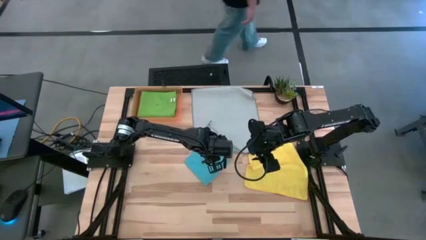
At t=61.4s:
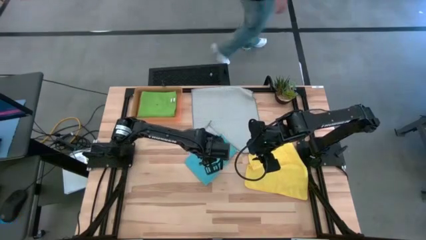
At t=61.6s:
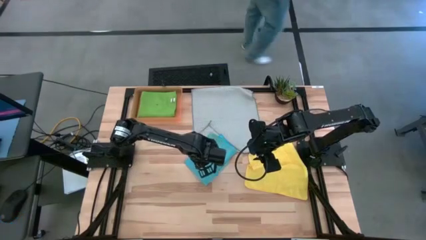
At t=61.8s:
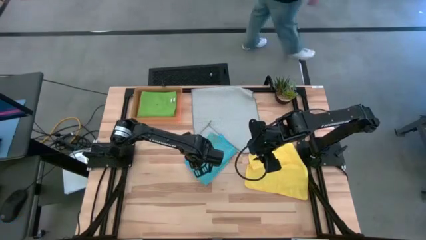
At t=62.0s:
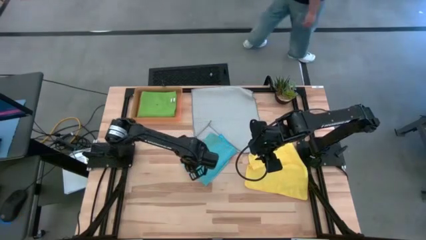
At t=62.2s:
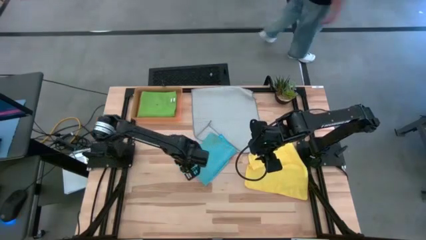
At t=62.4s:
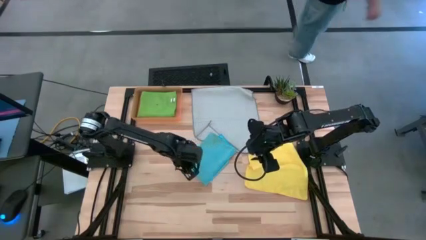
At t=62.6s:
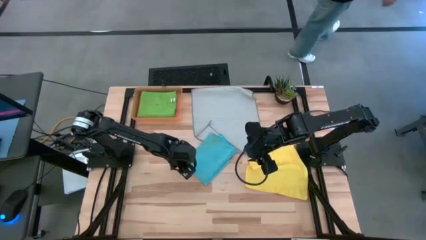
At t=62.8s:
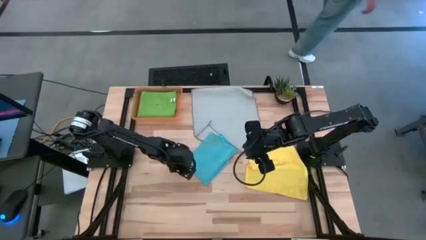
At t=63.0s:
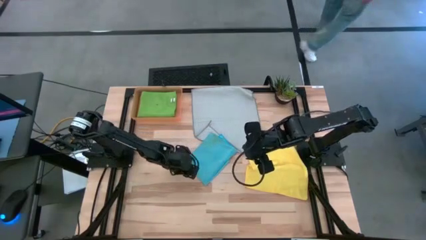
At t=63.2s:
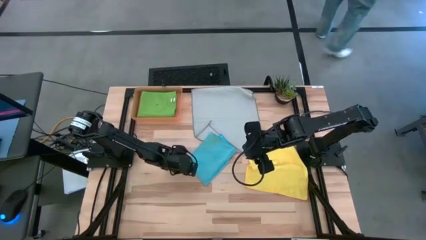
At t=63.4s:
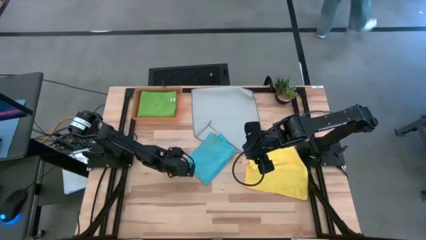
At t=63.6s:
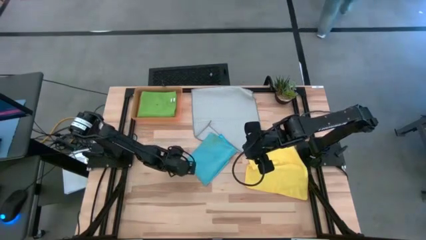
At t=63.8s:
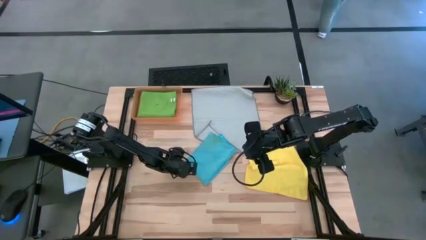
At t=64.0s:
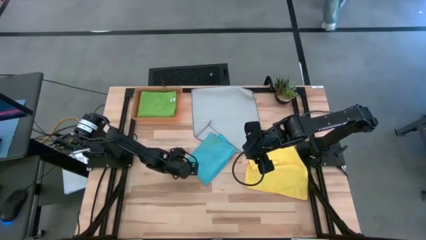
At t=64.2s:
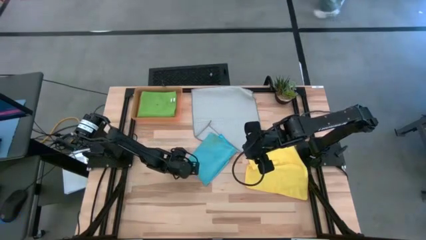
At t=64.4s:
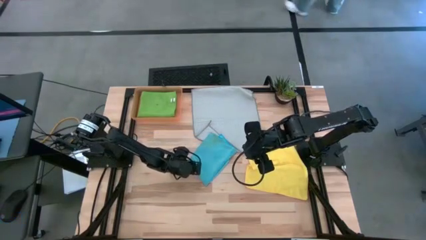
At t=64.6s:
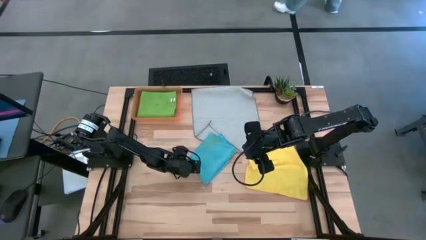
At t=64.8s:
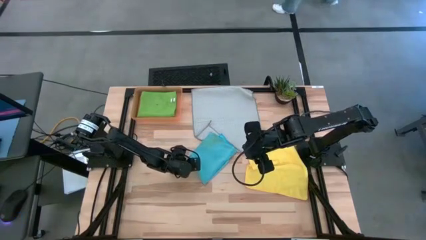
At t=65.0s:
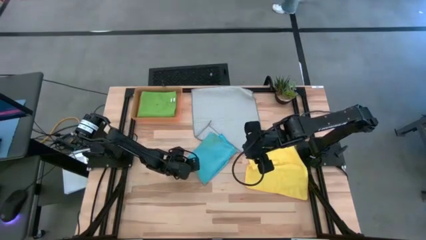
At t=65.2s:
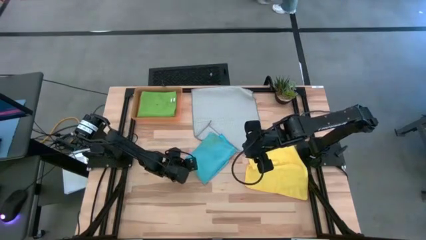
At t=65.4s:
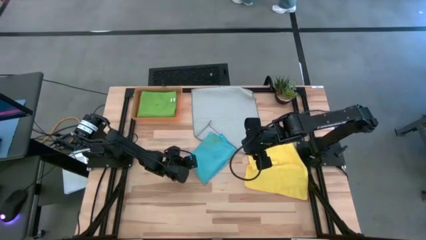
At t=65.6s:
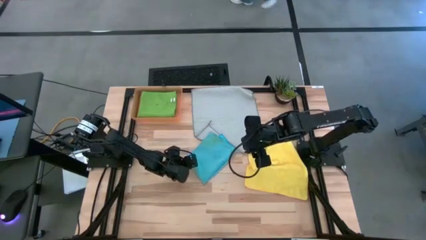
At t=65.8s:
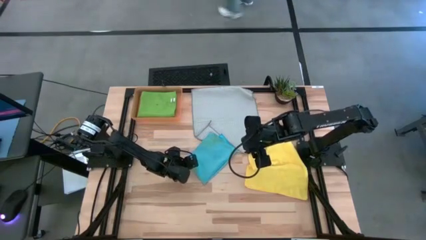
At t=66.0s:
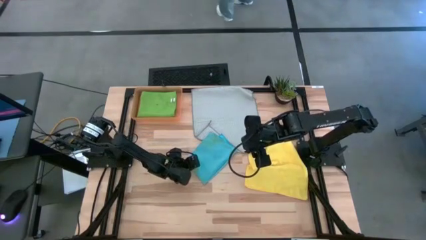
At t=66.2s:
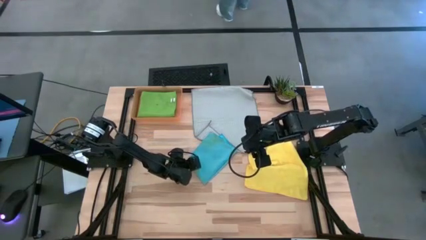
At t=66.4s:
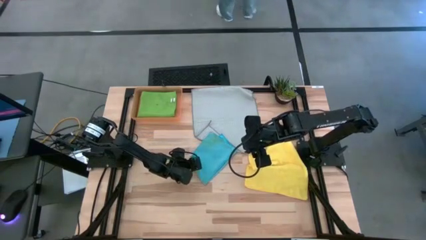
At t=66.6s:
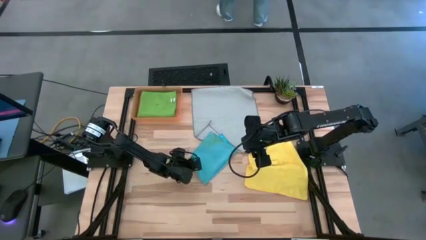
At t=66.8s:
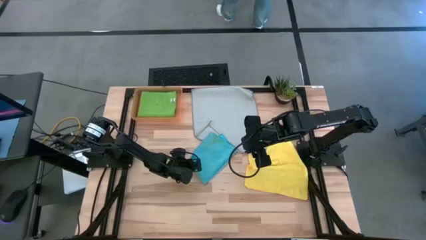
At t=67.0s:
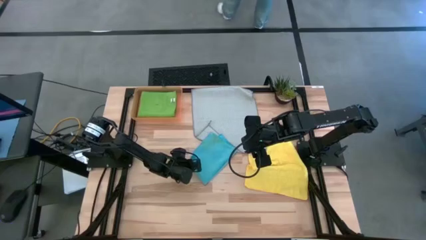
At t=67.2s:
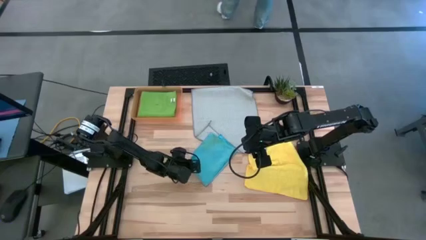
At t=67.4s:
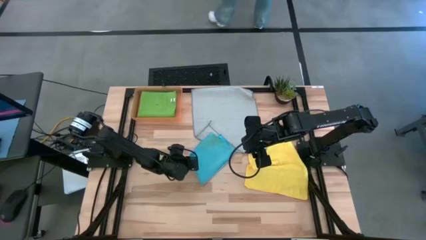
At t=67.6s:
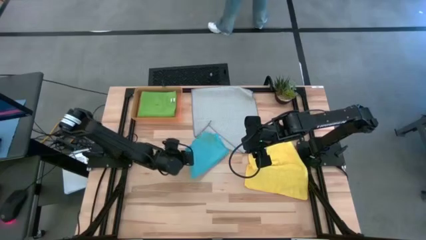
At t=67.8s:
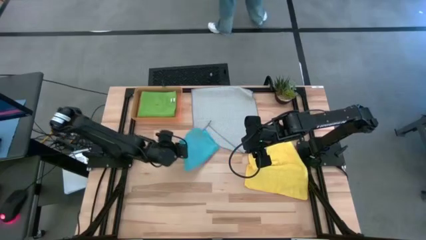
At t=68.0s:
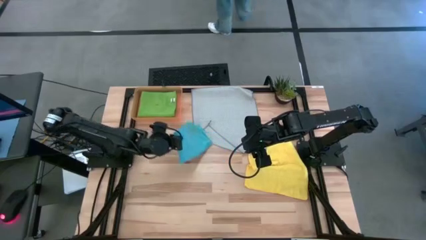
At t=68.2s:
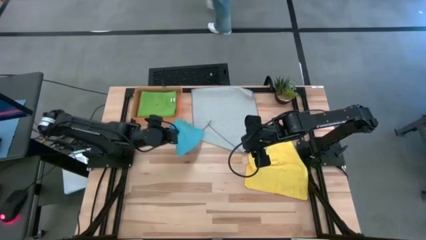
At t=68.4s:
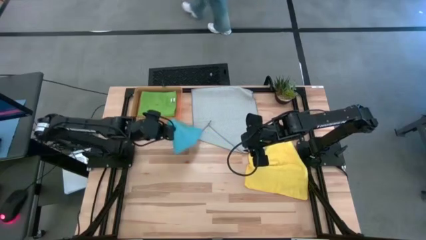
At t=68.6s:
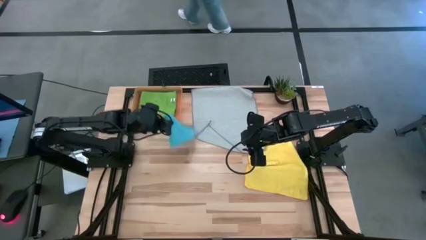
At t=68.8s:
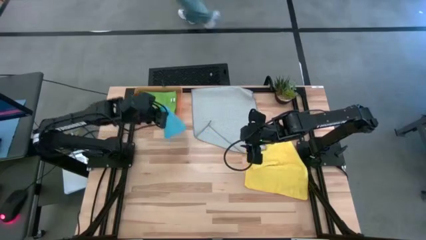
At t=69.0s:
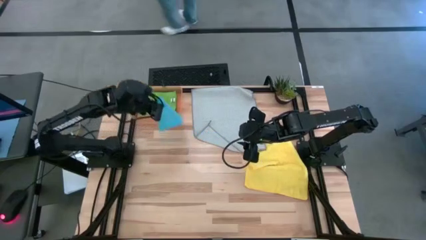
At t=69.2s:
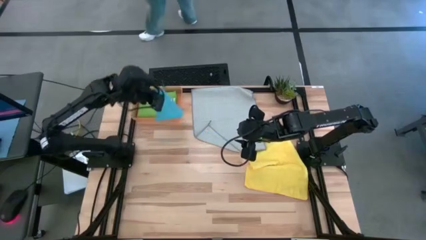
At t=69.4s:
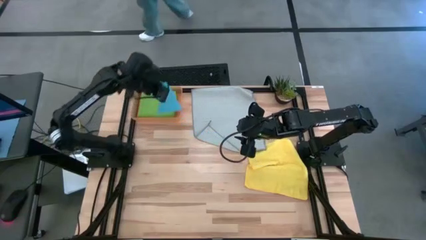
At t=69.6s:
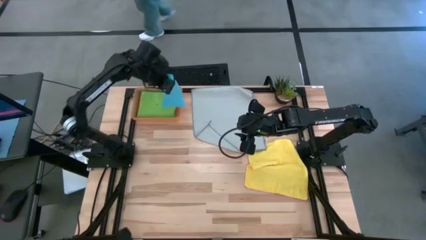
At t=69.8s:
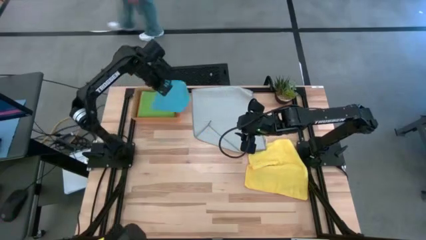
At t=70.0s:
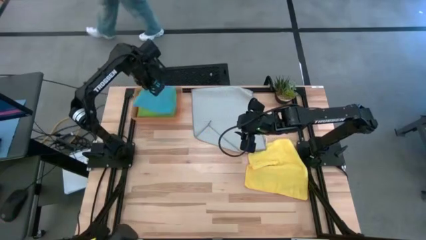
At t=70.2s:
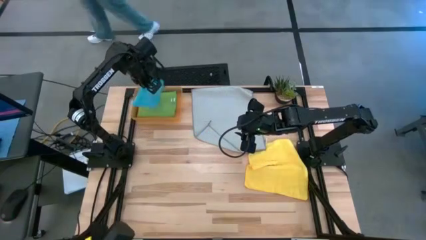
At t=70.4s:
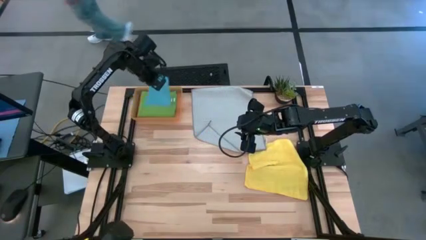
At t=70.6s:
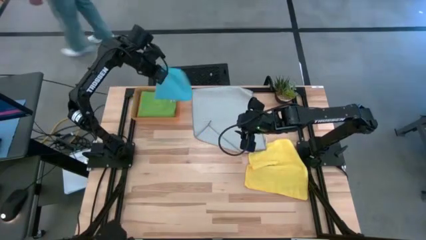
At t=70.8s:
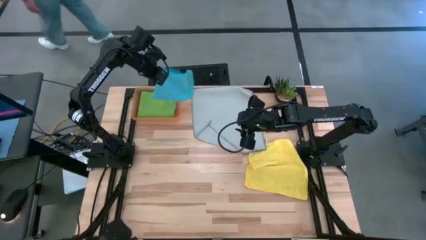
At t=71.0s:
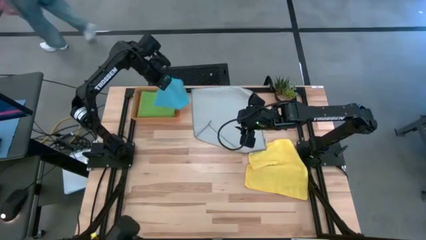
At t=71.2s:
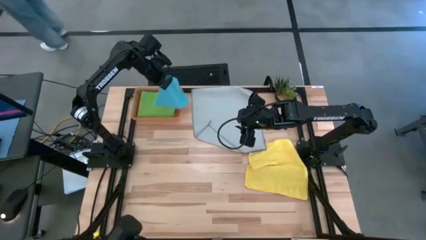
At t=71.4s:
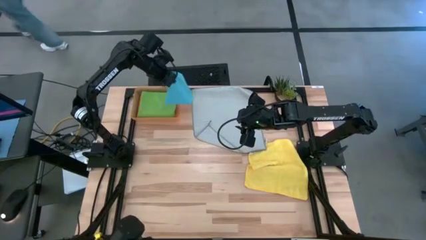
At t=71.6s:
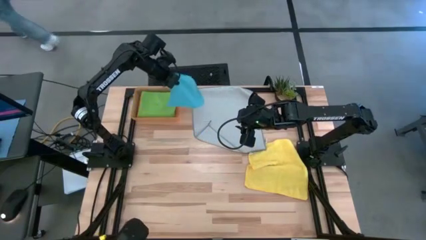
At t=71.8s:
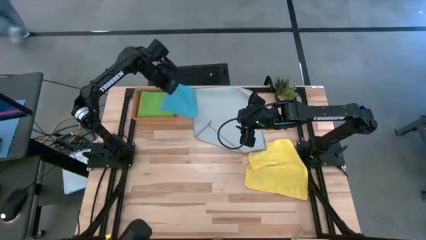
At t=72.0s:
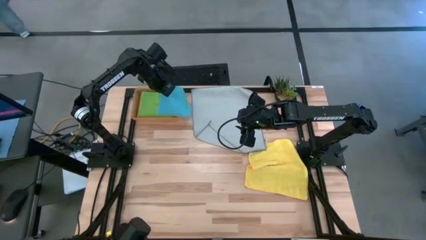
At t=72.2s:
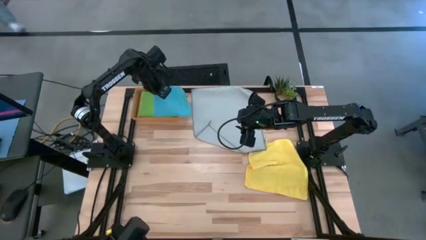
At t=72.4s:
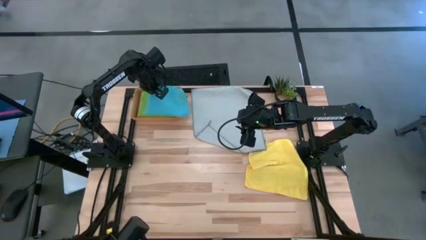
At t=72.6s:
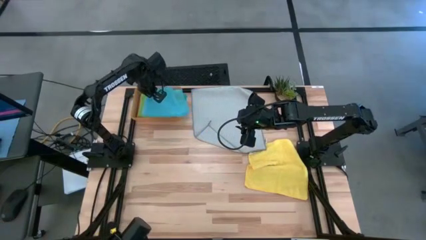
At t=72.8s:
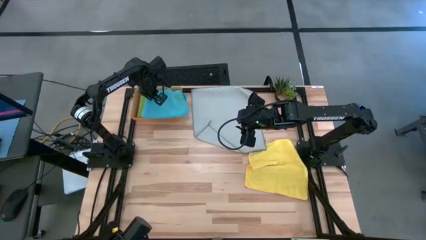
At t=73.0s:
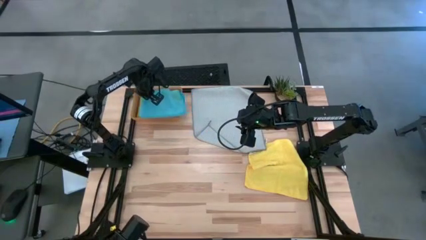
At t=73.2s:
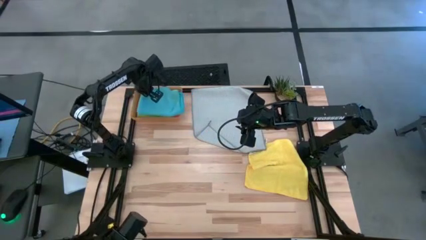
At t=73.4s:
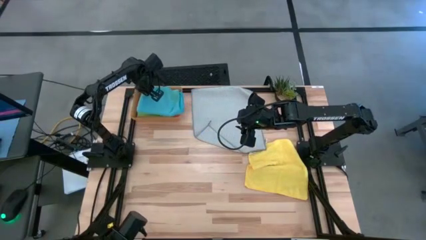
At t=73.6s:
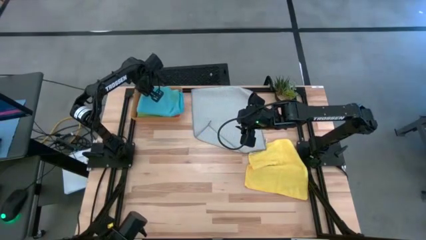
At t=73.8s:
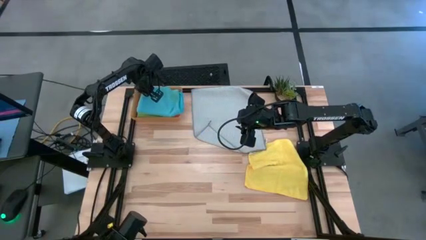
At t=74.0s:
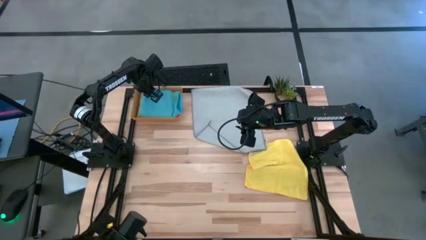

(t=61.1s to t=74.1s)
Task: Fold microfiber towels
Put the blue microfiber towel into the orange bin

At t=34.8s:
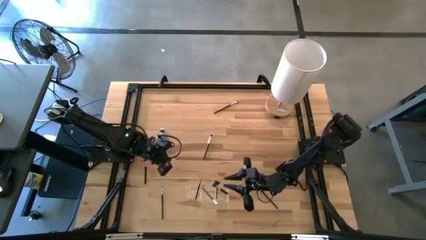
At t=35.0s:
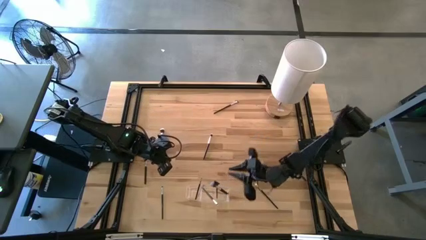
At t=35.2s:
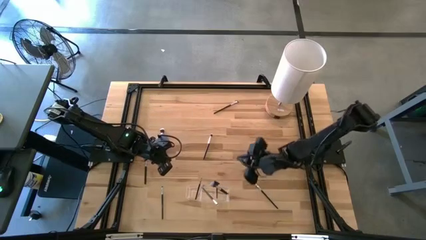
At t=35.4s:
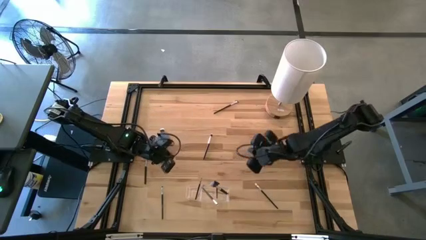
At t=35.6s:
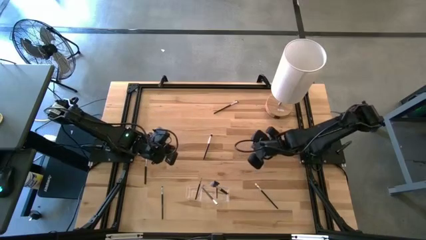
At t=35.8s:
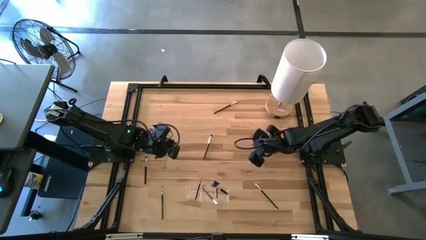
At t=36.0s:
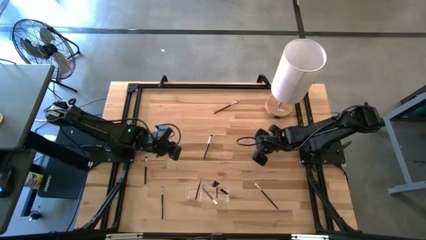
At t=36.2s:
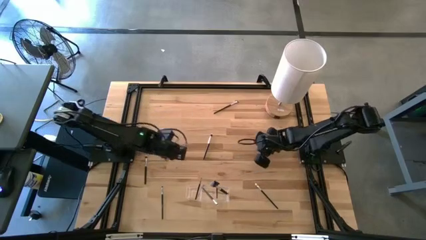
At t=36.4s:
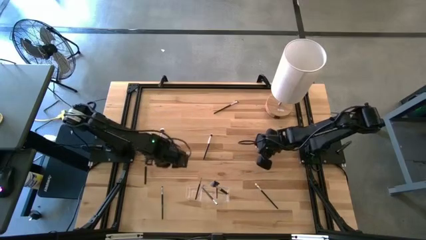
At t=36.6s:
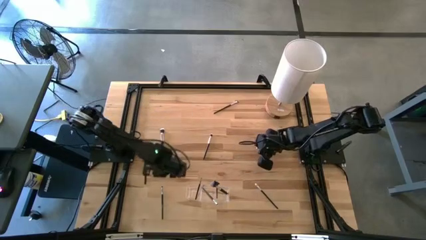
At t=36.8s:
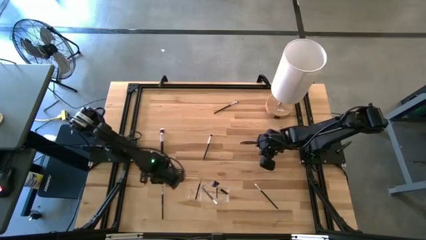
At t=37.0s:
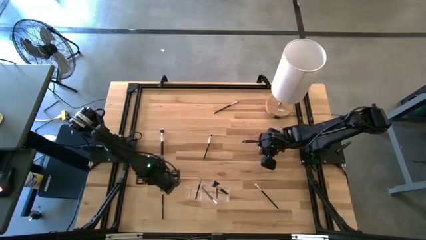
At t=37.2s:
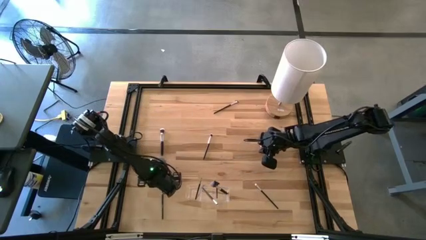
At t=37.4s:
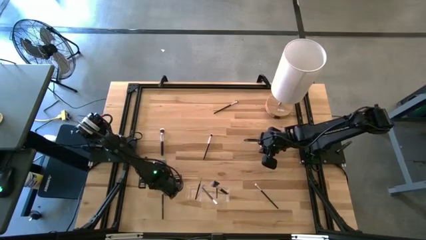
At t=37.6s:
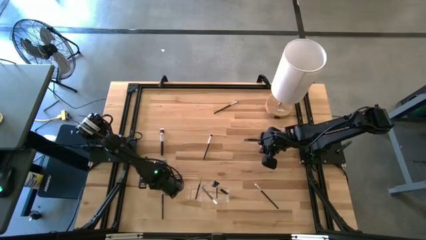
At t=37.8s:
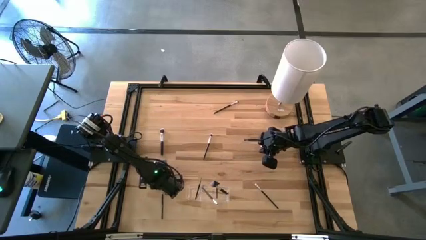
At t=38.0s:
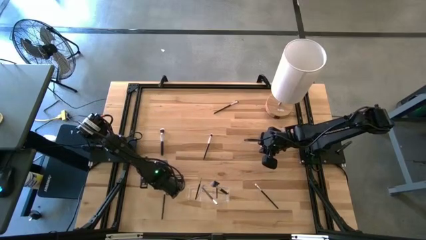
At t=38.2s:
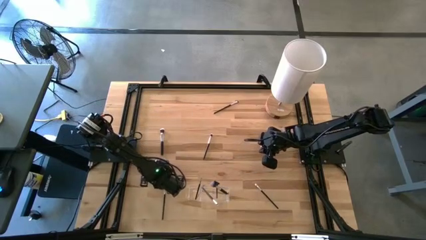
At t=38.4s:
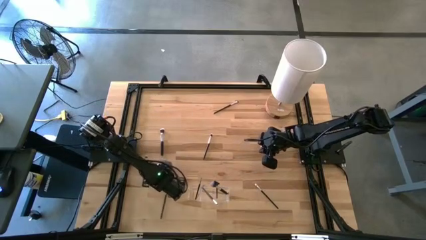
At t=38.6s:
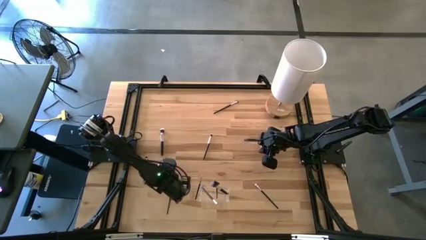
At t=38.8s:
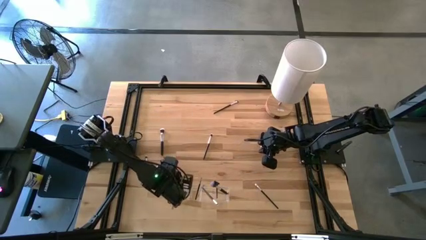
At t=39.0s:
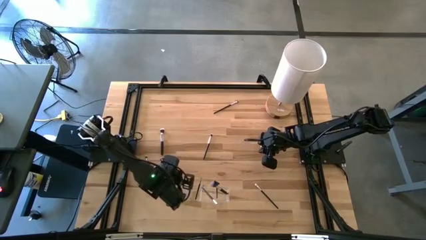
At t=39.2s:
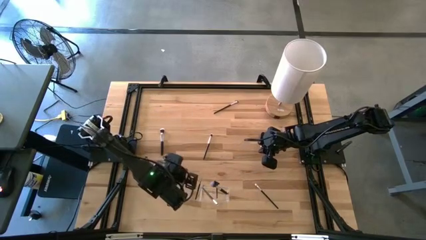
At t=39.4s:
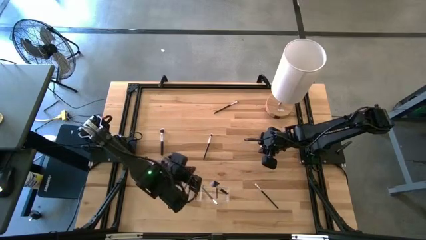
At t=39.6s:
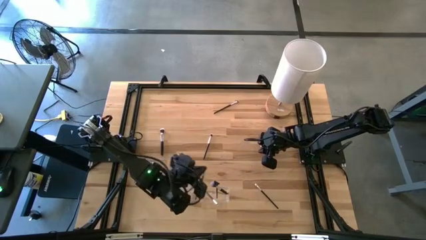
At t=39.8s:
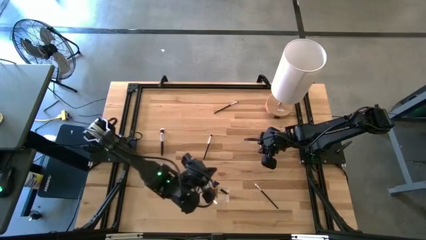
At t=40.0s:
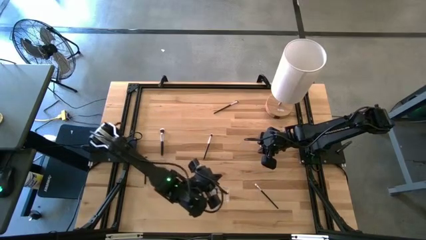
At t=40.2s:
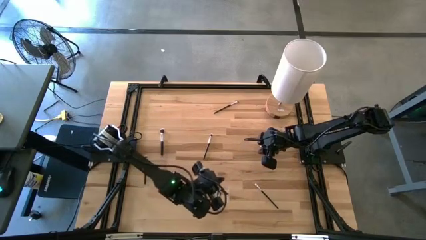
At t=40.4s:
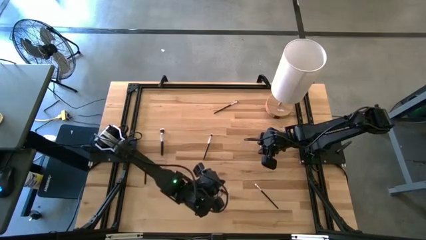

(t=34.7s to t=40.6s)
Task: Put items in baskets/containers
Put the black eyeshadow brush into the transparent organizer
